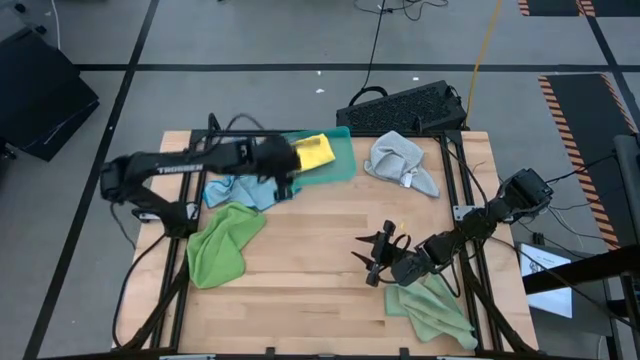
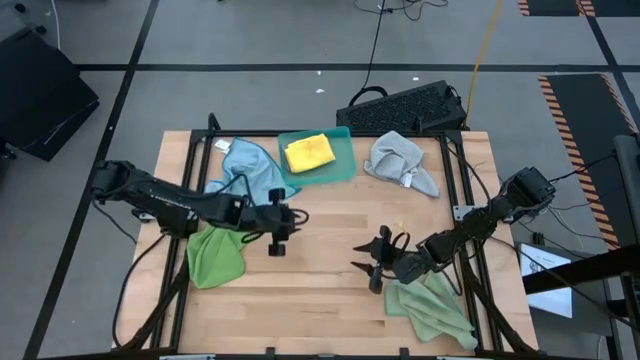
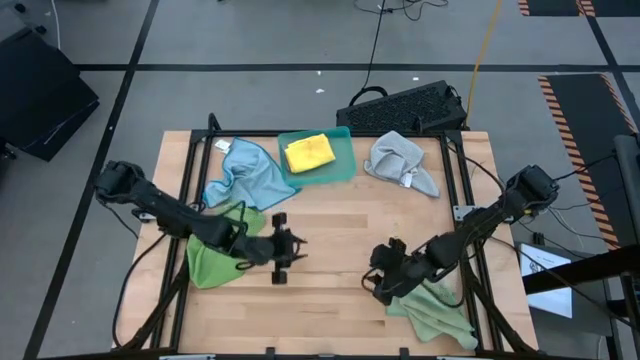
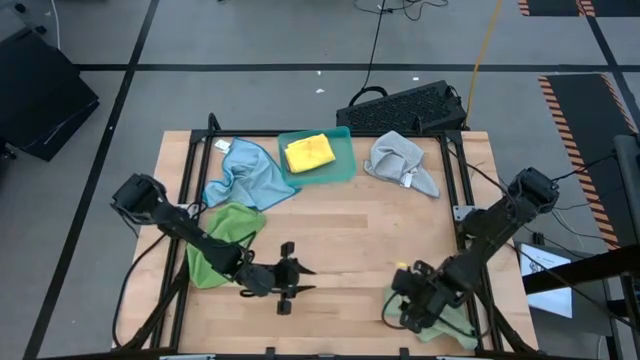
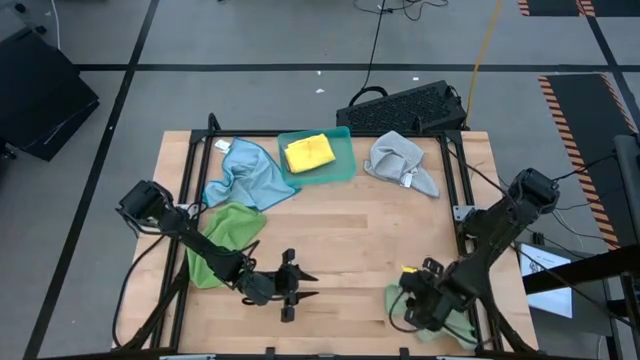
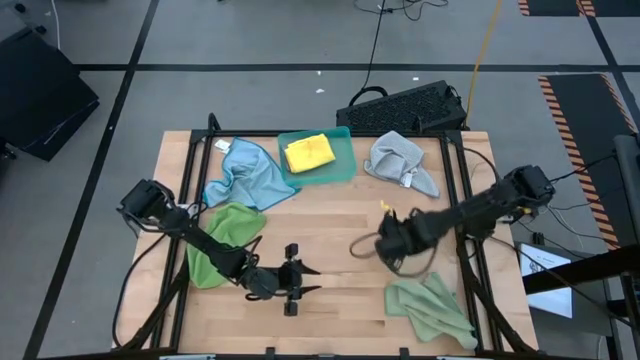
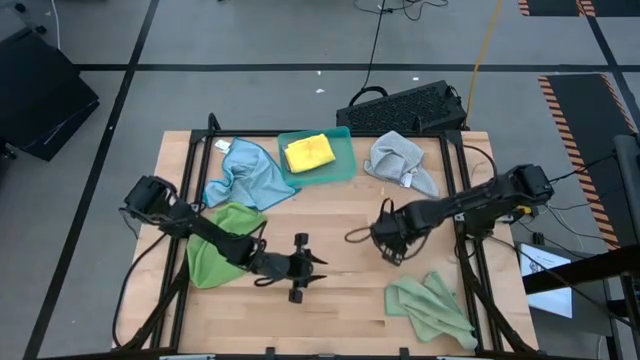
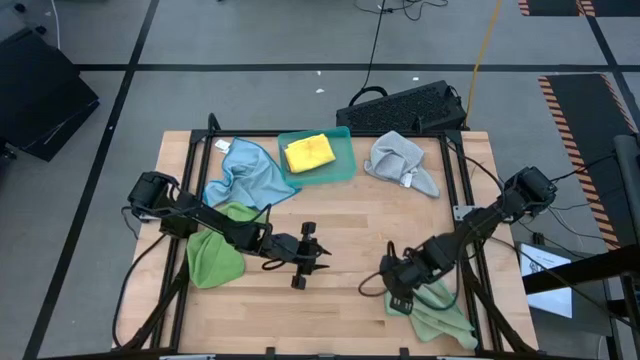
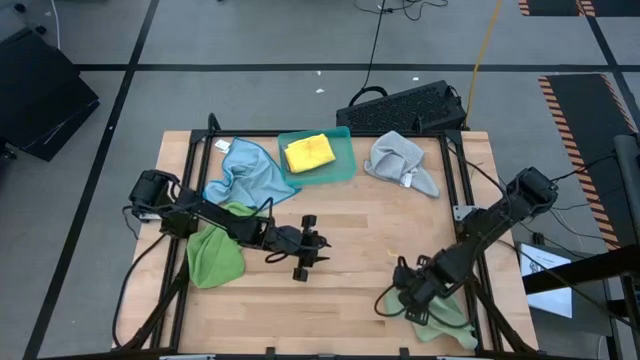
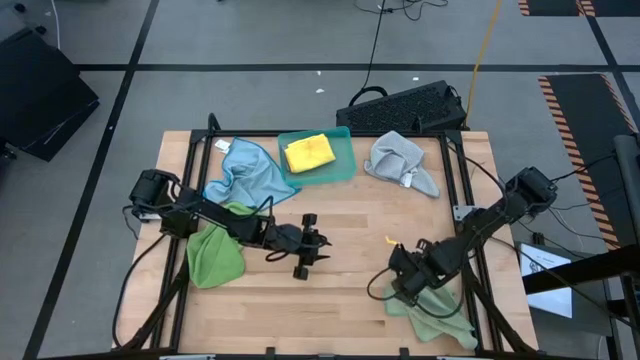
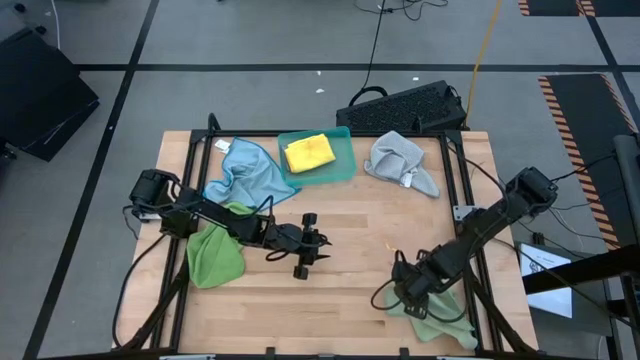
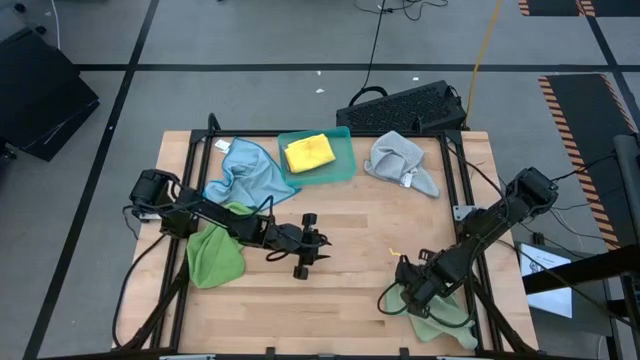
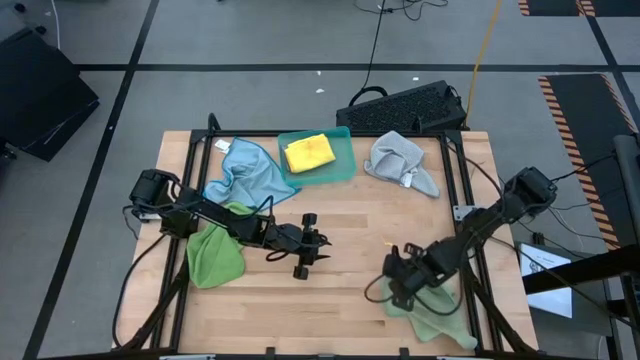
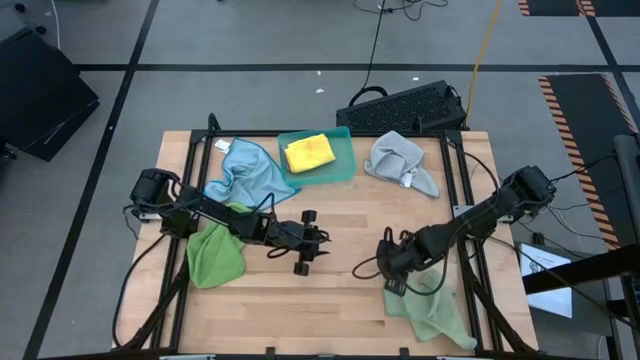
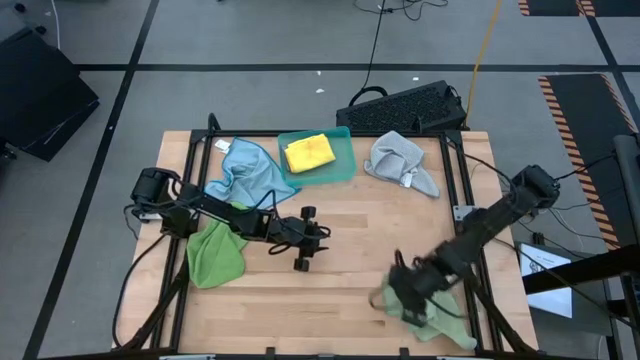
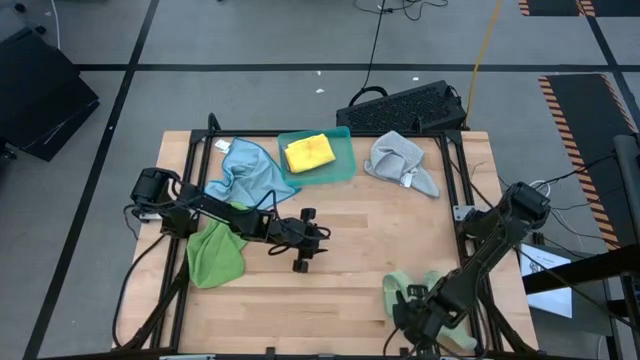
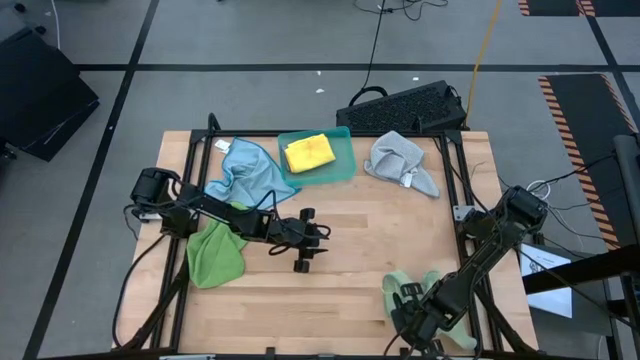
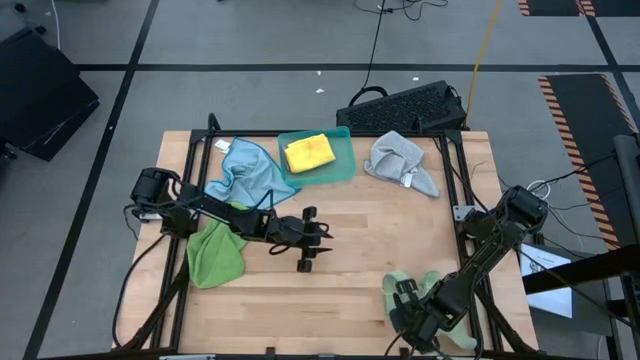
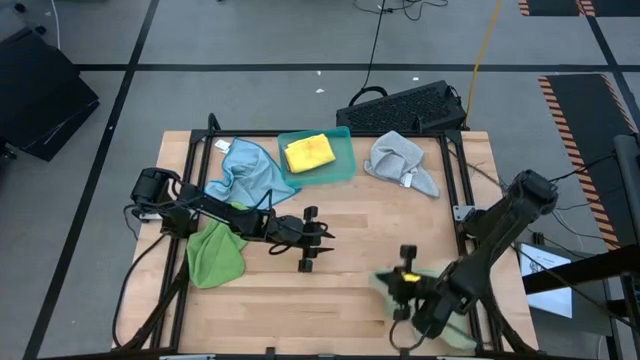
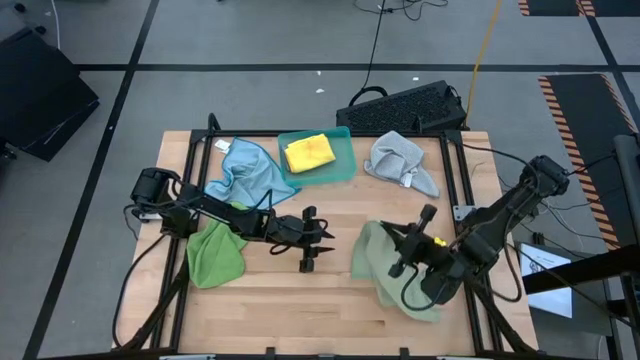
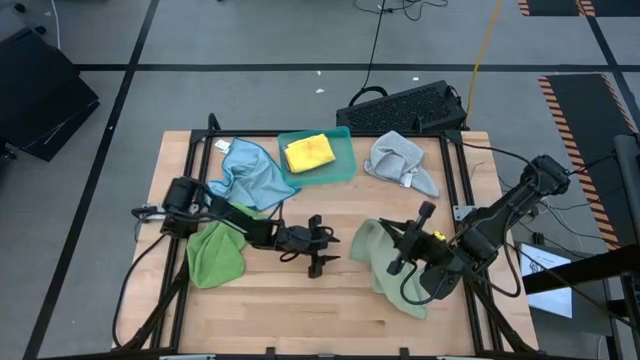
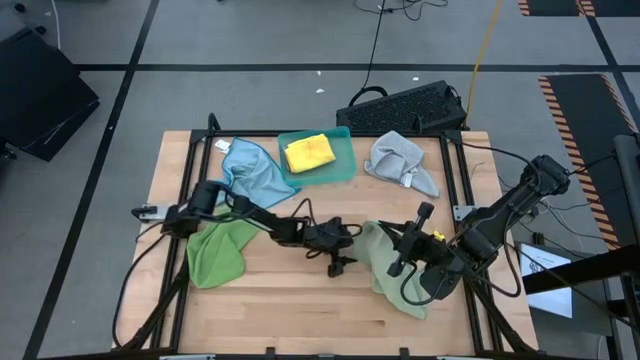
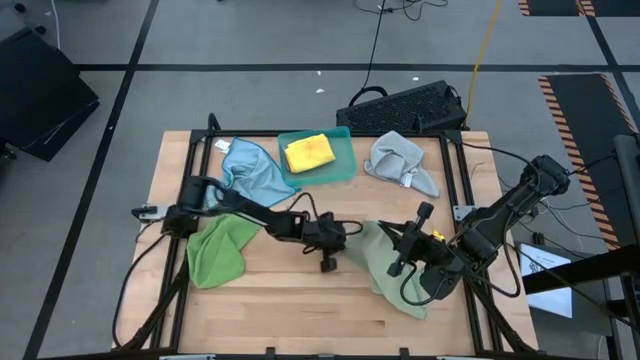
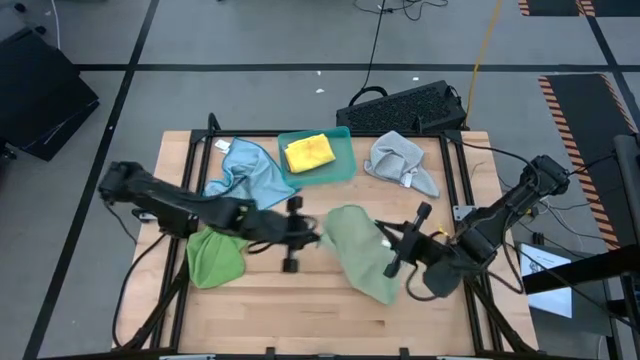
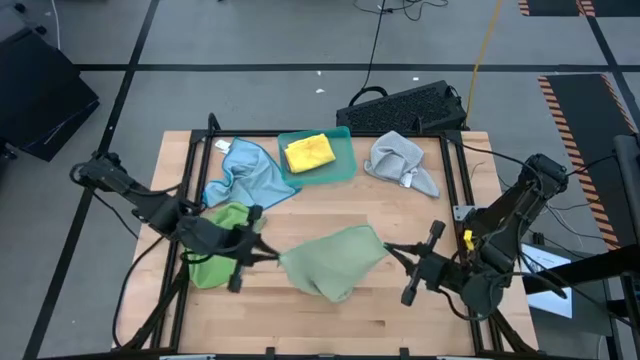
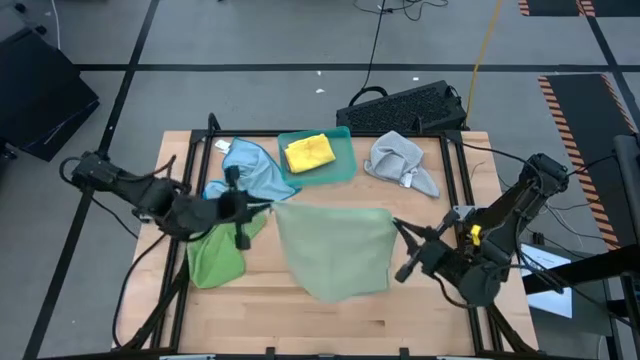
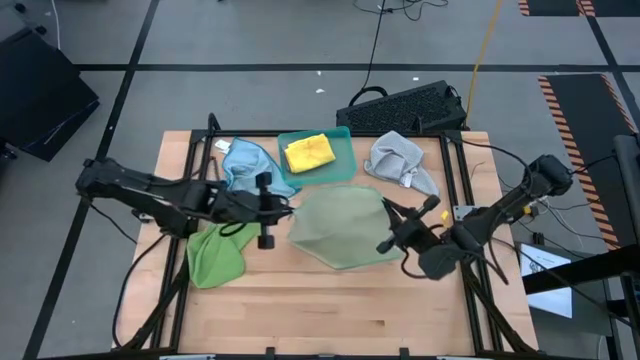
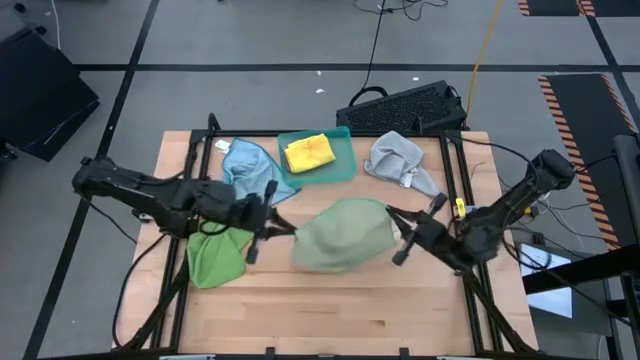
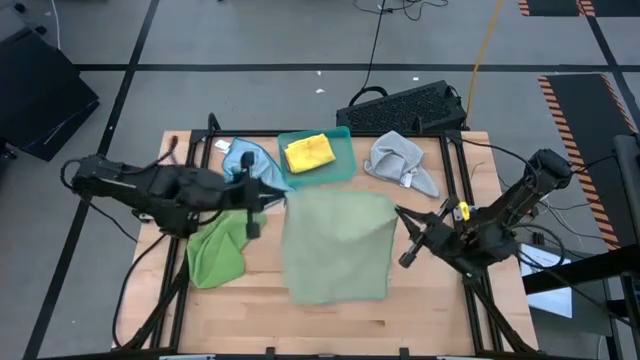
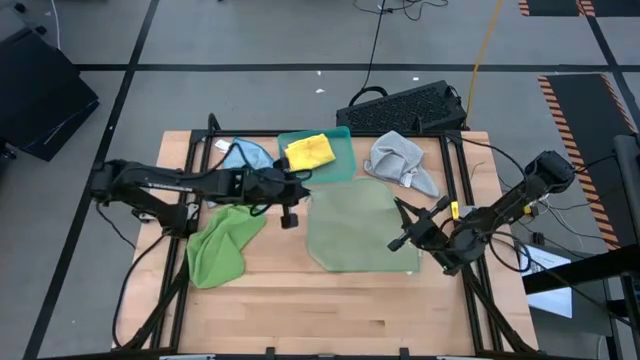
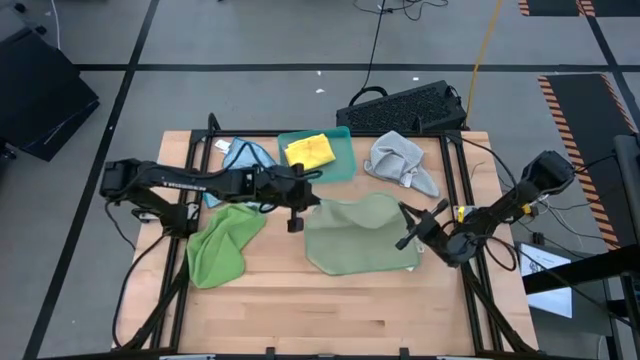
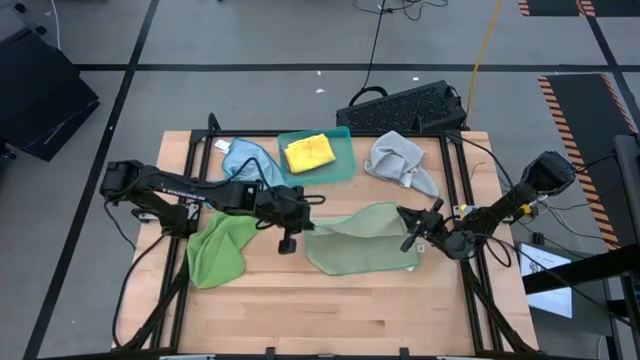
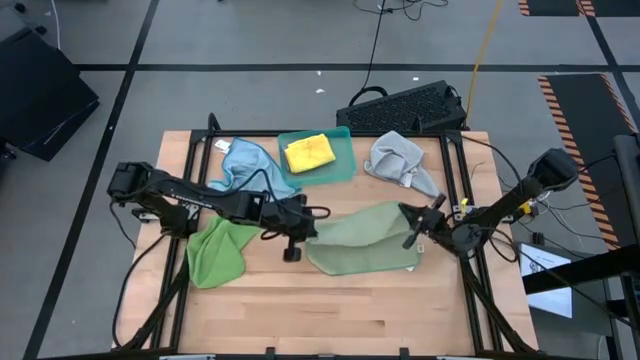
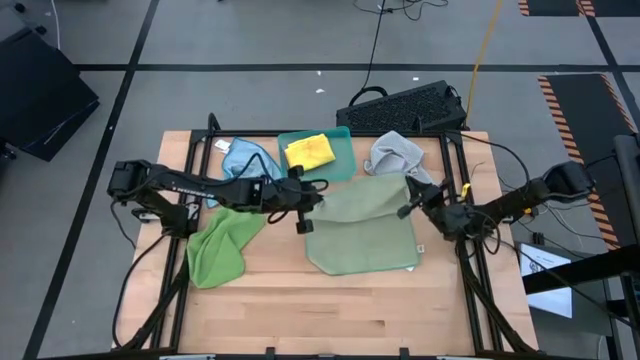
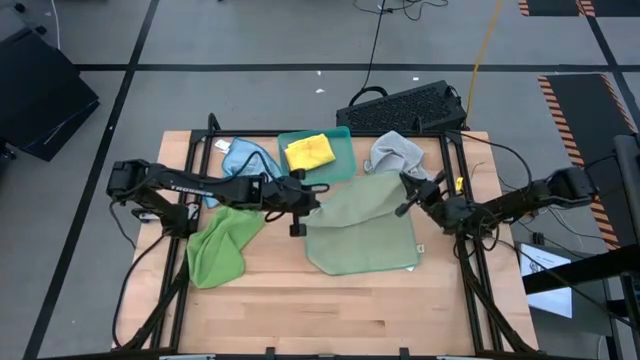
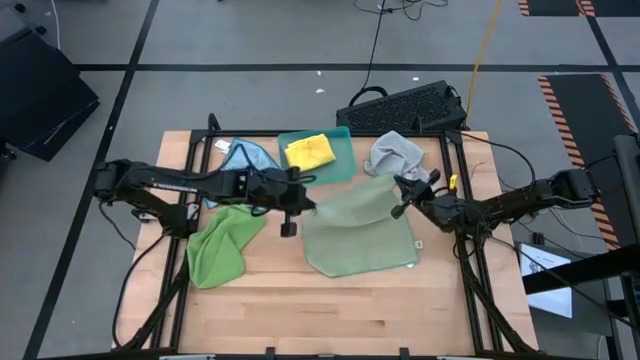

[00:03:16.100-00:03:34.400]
Task: Fold microfiber towels
Fold the light green microfiber cloth

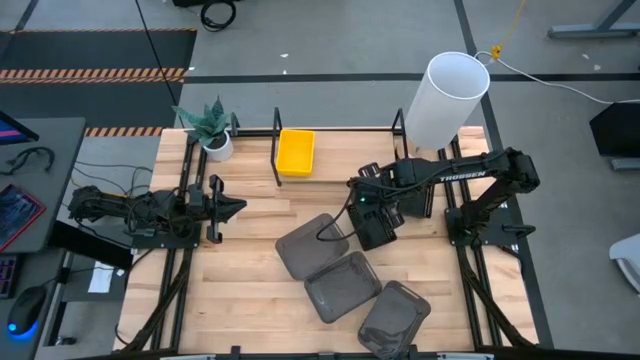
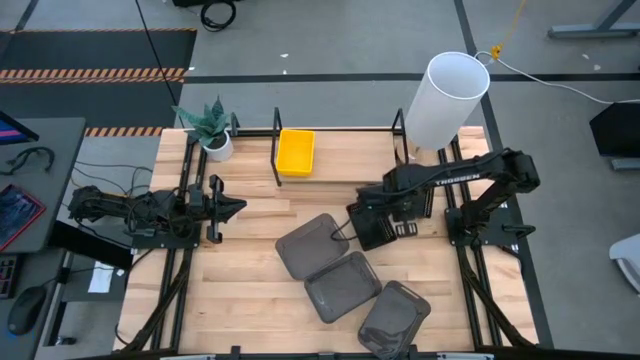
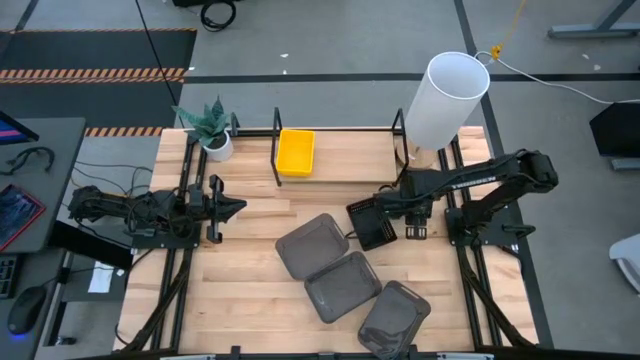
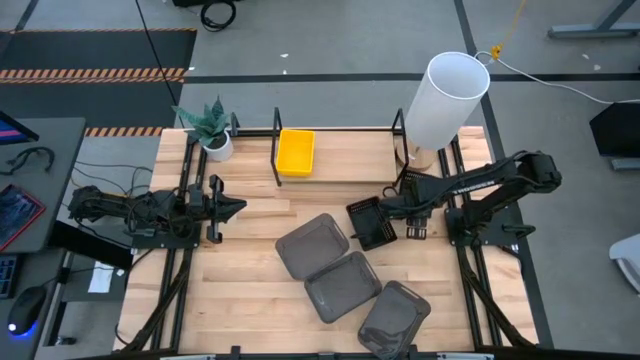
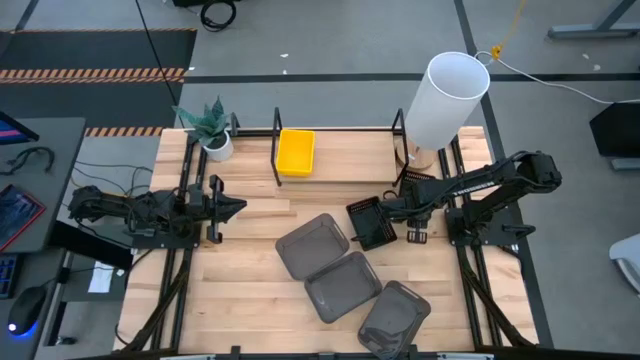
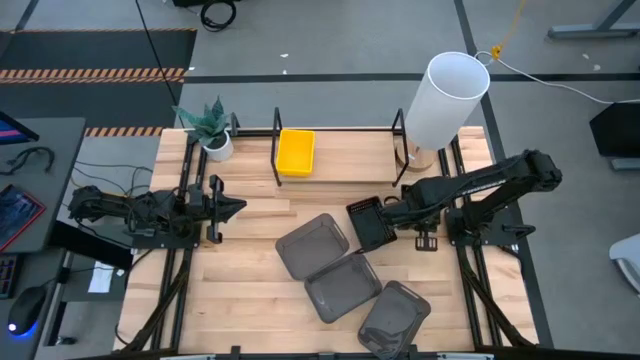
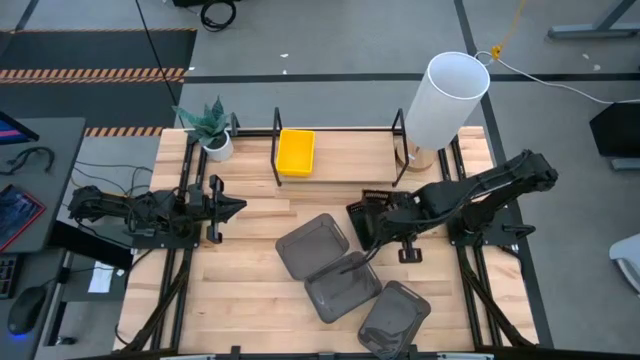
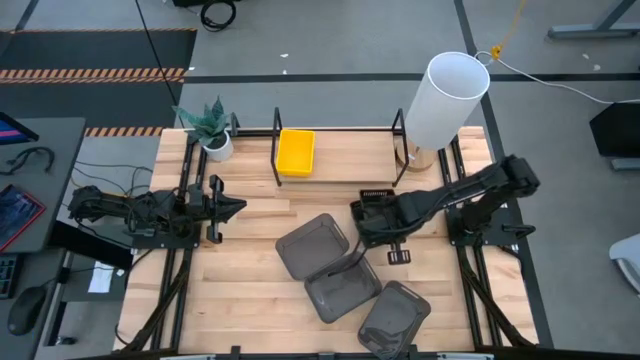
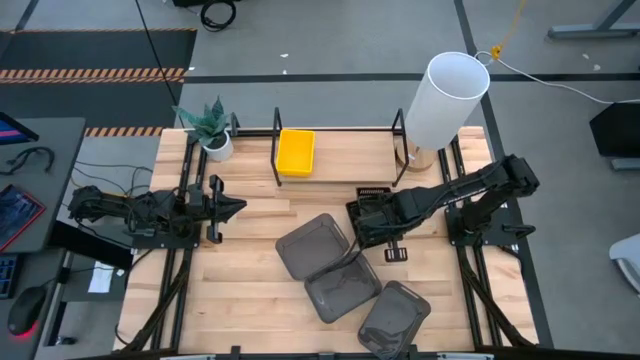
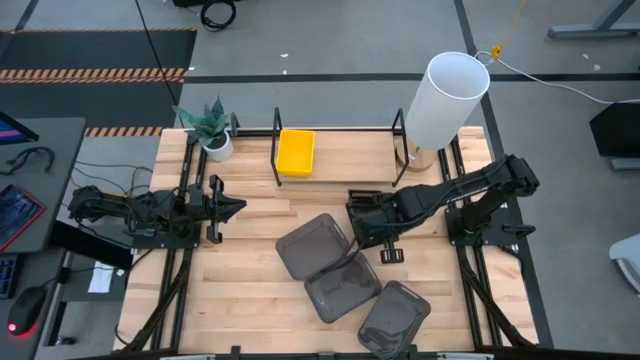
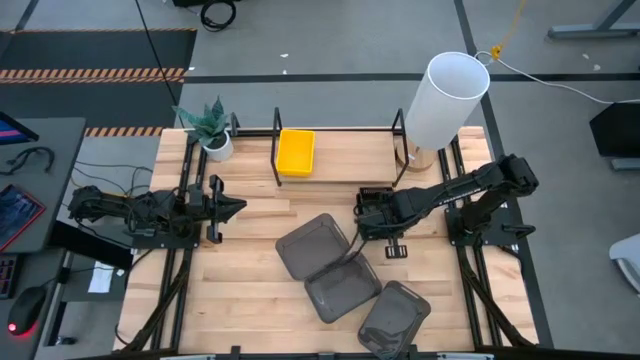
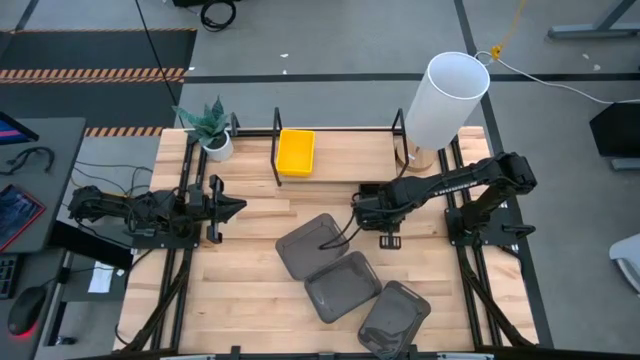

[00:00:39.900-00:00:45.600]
Task: Stack baskets on shelf by color
Stack the right black bin on the left black bins
